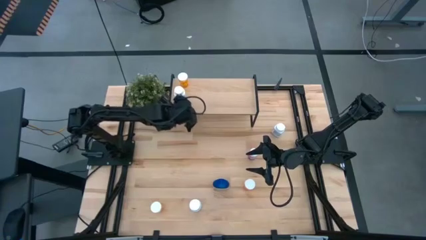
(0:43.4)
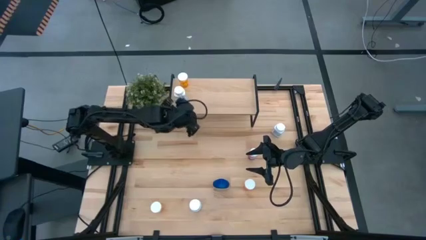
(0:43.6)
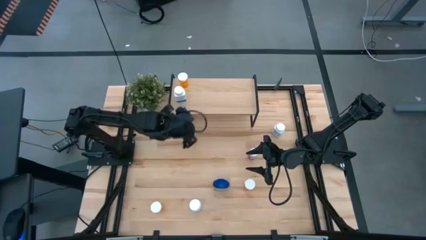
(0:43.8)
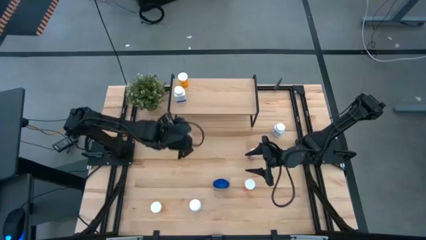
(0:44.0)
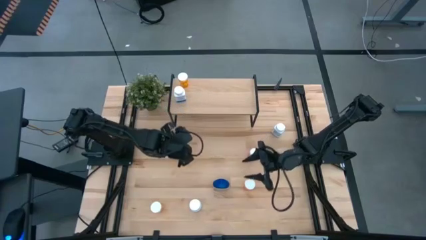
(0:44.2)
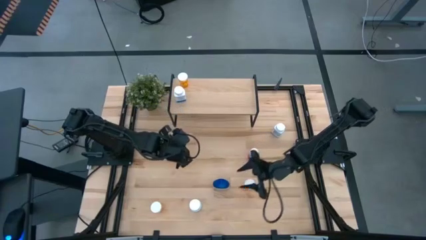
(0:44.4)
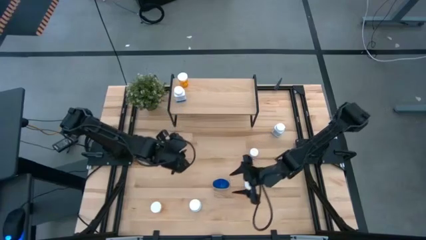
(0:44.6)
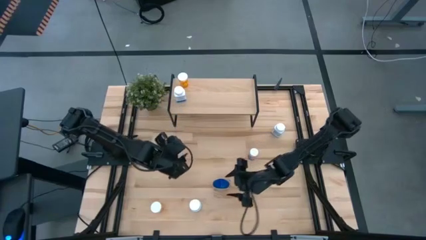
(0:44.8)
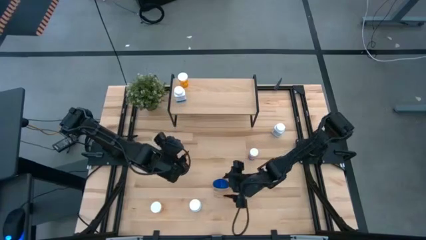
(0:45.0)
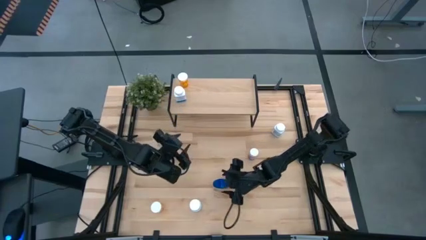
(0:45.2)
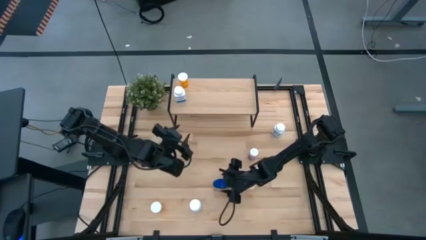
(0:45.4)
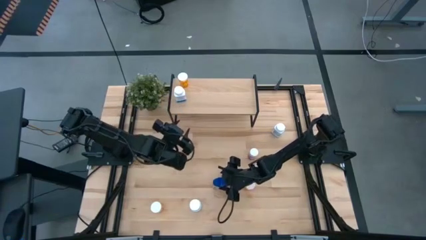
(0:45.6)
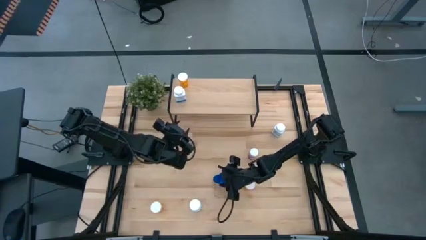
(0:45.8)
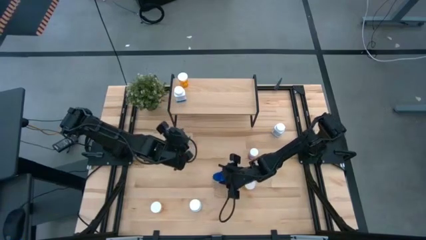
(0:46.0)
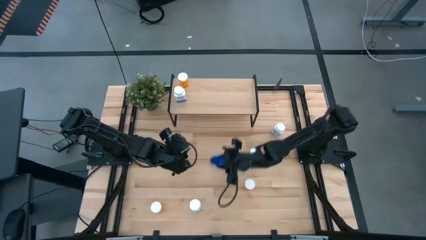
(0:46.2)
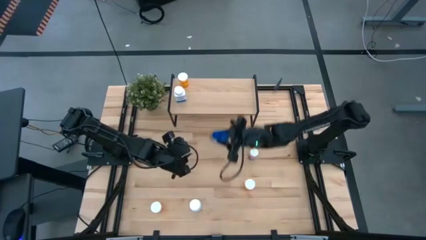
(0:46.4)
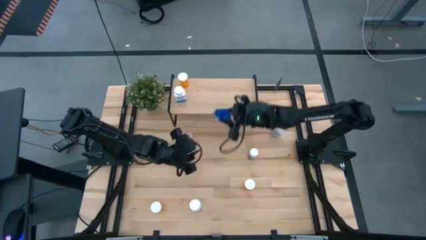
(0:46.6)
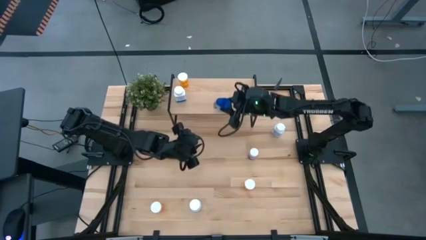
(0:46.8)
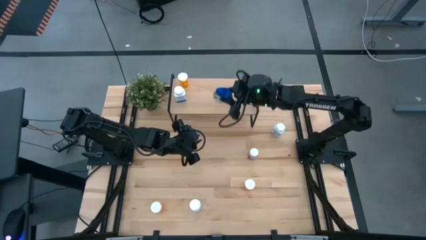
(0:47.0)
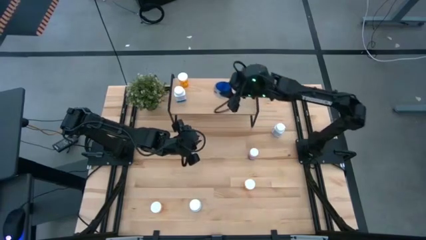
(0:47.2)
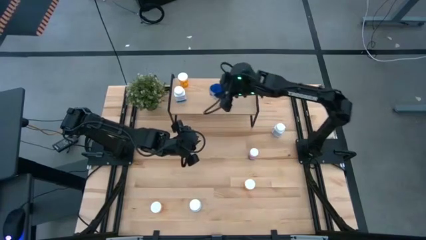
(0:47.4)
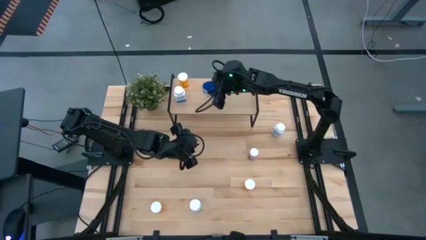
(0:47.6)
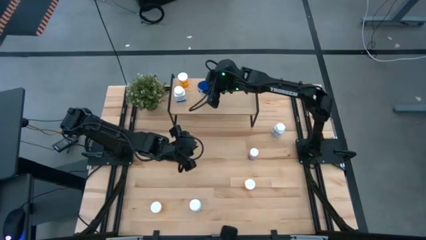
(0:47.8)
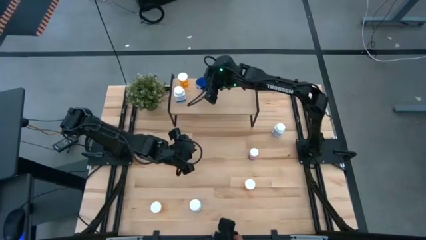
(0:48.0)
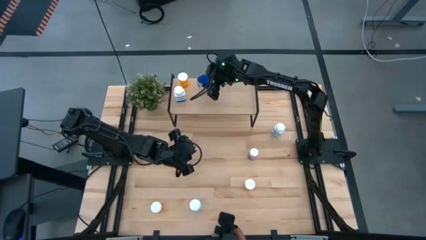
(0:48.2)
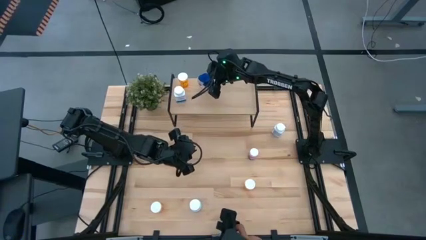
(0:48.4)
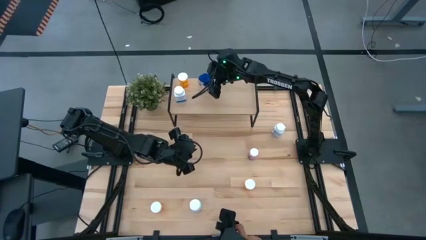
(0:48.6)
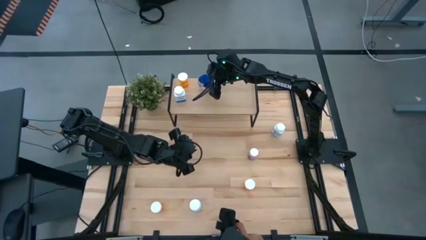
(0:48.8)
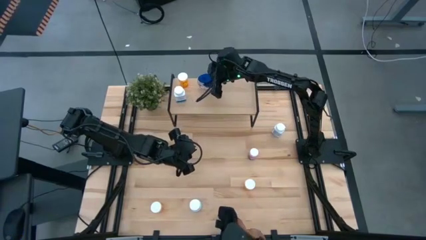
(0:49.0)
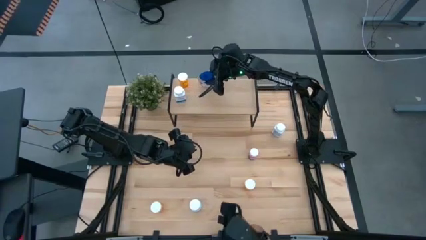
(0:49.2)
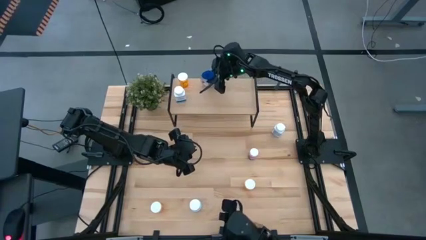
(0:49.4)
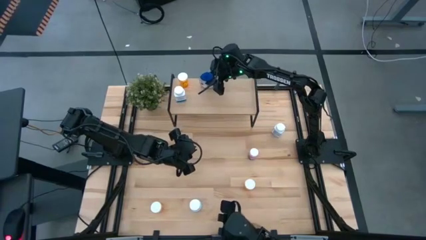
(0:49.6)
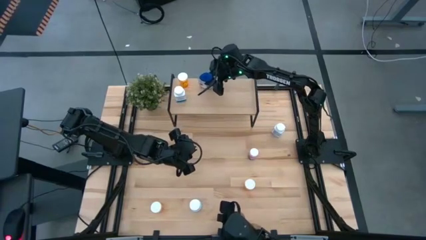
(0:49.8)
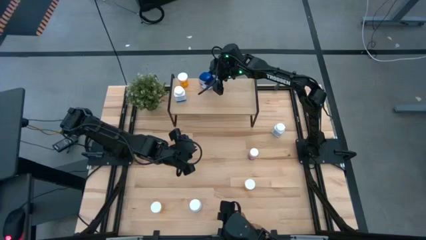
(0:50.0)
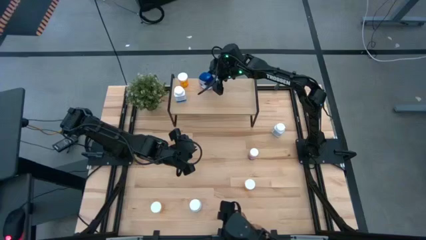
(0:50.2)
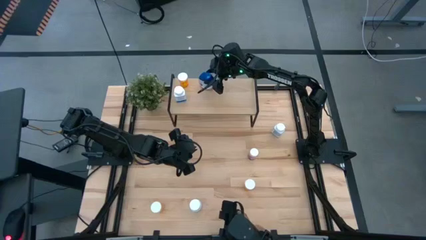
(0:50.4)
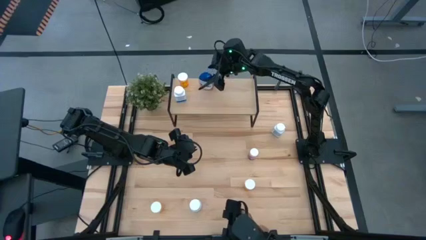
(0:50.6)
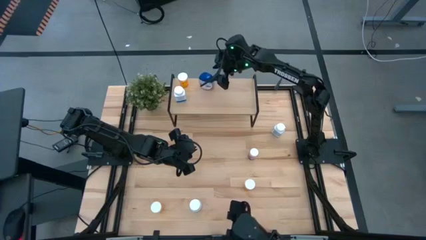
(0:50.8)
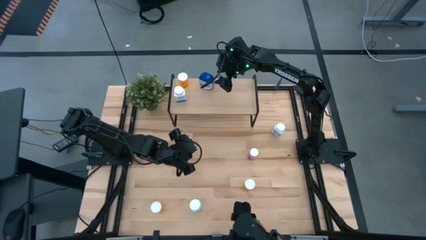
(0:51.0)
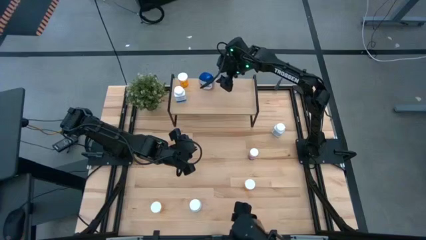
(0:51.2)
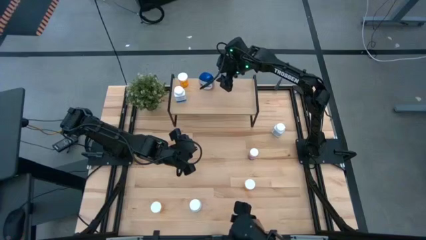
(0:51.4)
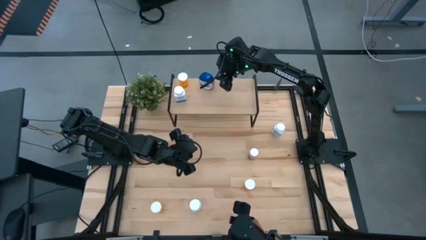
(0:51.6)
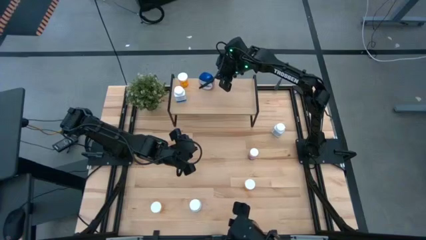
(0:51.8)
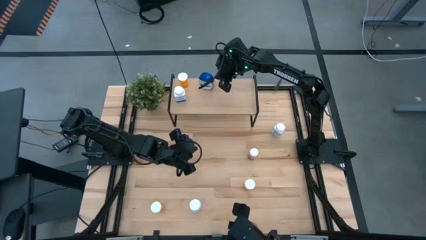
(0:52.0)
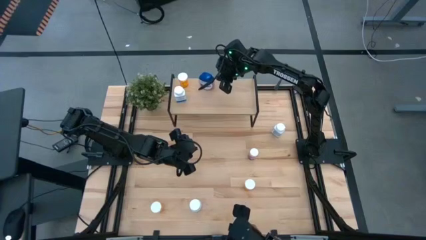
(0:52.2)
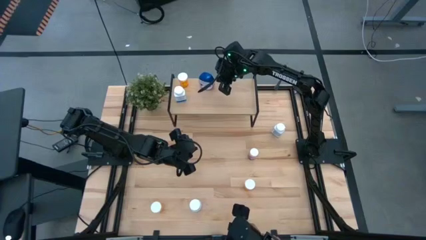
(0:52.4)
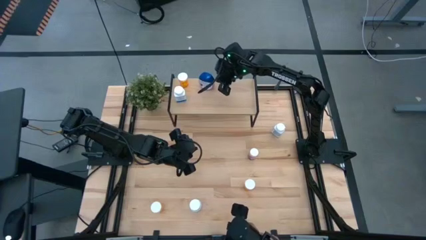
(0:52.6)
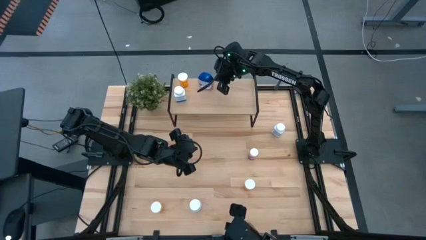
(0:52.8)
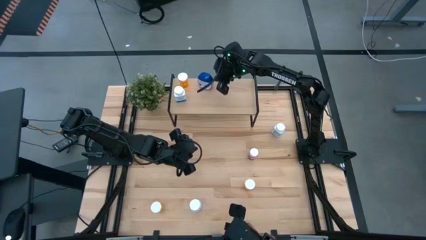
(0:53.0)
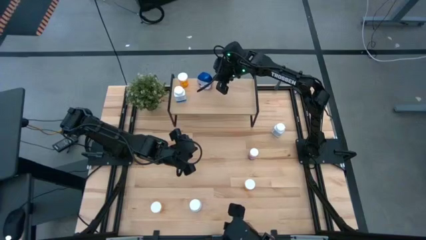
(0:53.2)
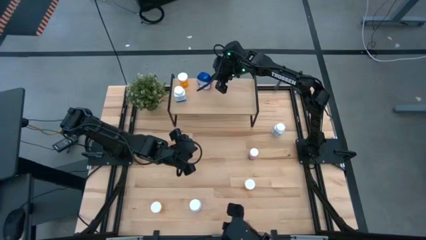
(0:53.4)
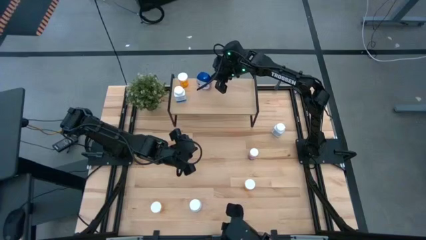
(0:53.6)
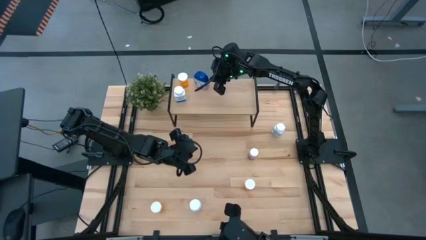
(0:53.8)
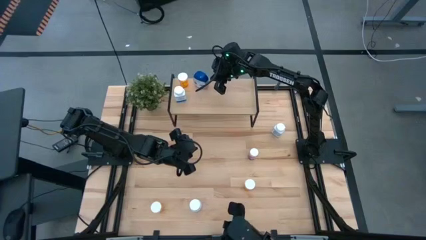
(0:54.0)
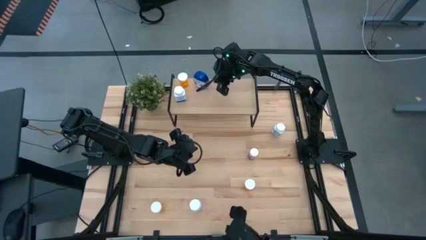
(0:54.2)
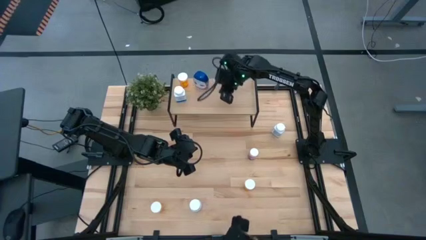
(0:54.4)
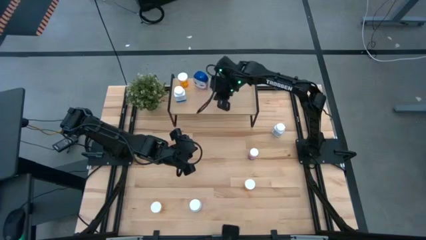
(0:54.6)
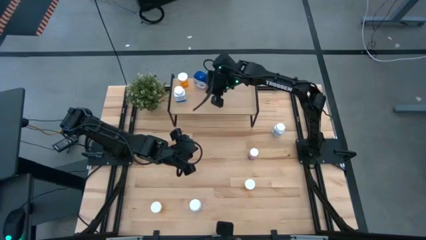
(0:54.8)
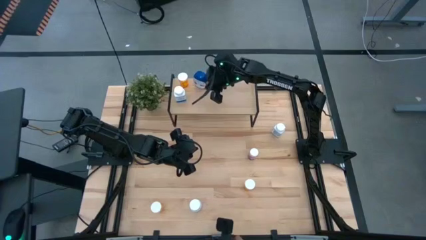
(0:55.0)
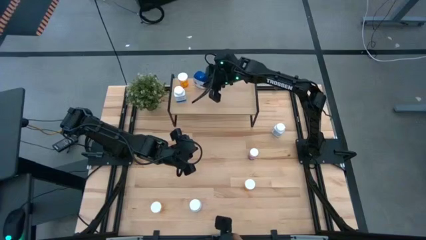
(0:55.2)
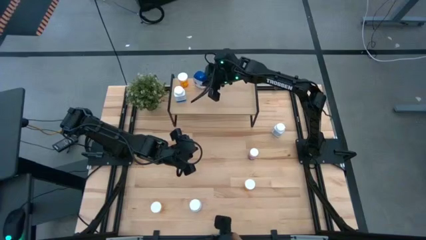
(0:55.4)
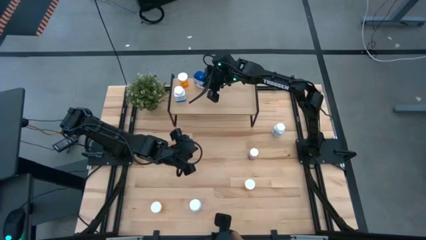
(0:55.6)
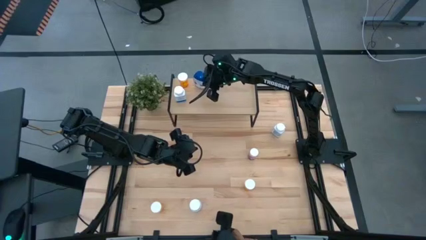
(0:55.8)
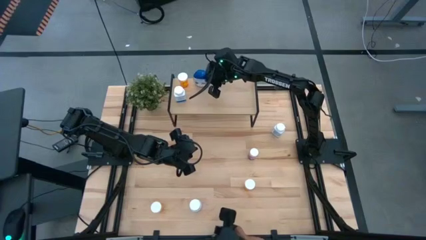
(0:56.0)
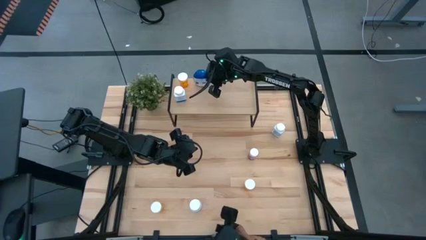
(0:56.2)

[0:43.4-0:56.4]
Task: Pick and place medicine bottles onto shelf by color
Put the blue pill bottle on the shelf

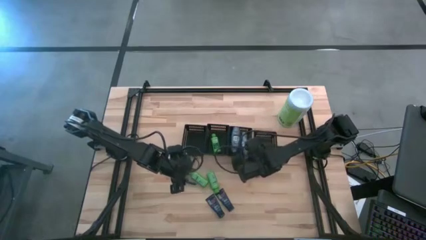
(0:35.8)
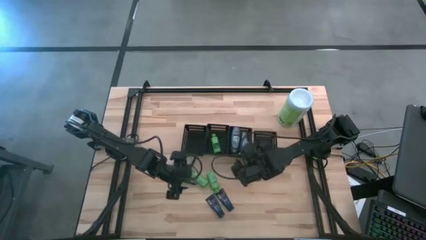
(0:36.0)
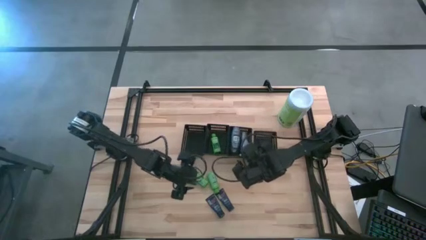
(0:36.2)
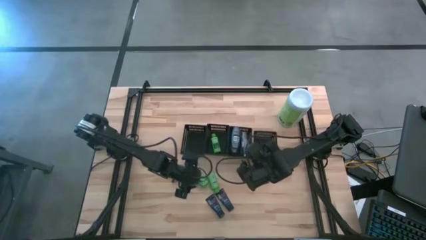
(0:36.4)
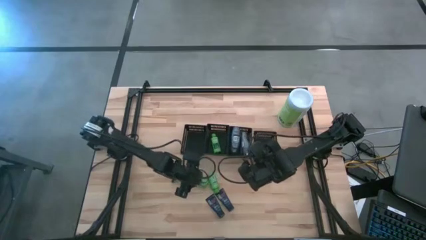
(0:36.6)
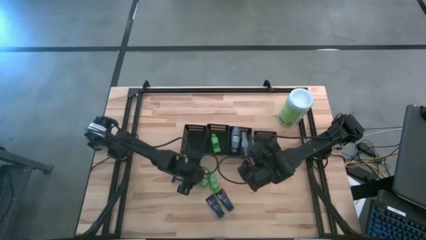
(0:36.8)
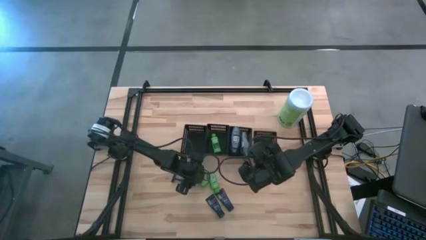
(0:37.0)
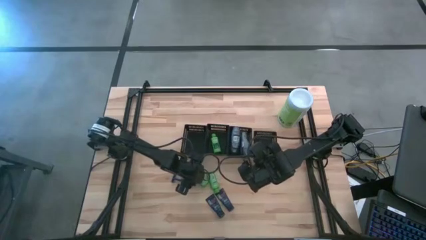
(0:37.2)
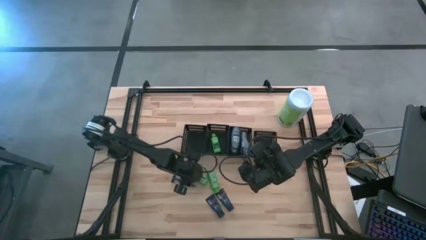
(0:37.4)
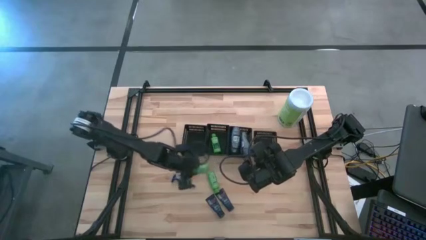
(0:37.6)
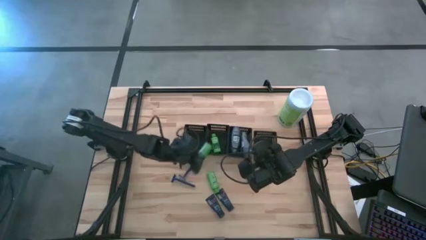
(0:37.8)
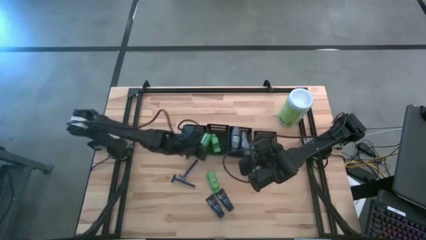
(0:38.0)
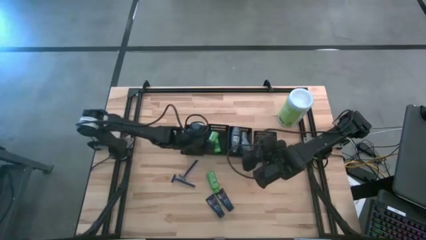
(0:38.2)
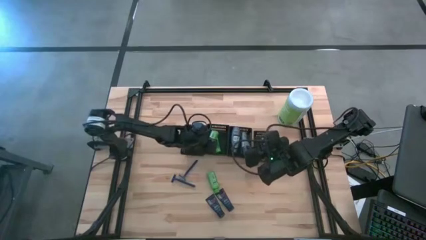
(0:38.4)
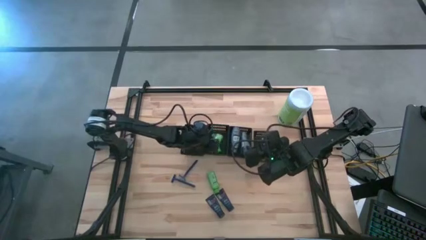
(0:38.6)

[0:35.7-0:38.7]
Task: Pick & Place Travel size toiletries
Put the shampoo into the middle left black bin
